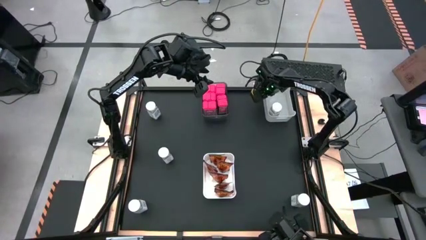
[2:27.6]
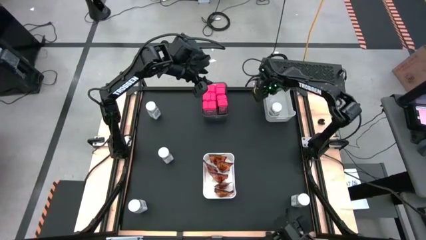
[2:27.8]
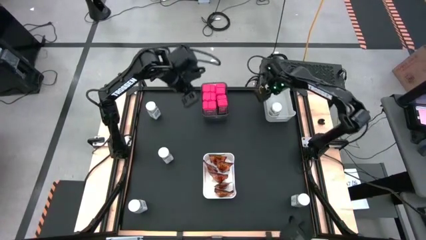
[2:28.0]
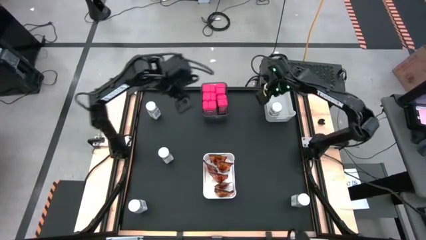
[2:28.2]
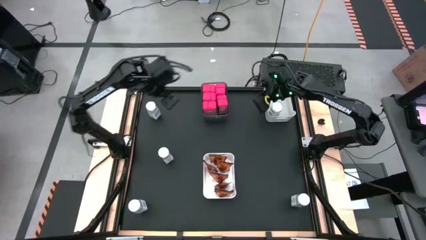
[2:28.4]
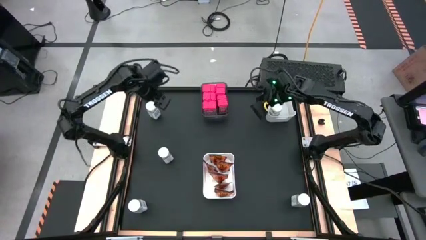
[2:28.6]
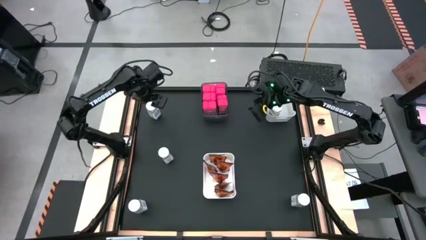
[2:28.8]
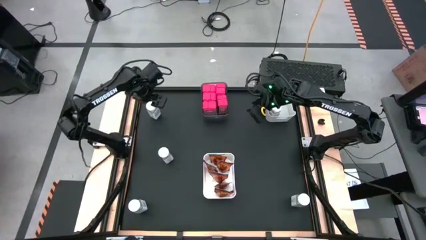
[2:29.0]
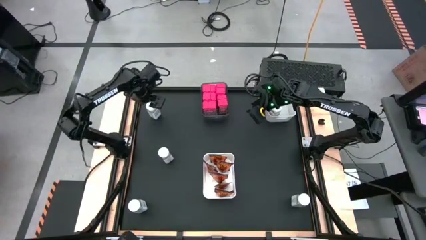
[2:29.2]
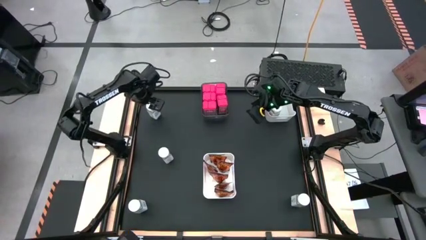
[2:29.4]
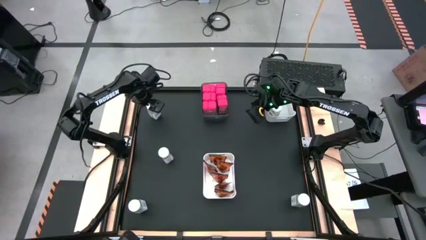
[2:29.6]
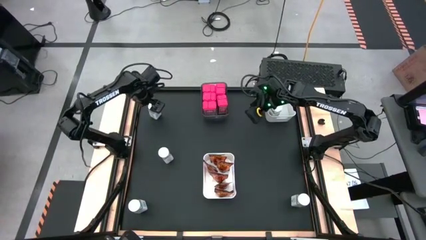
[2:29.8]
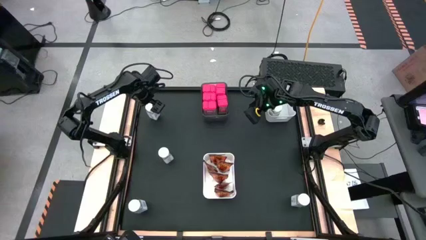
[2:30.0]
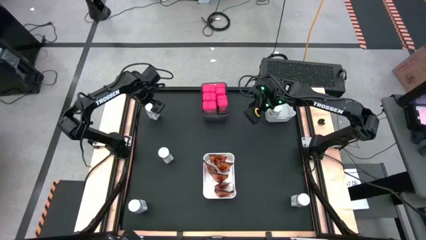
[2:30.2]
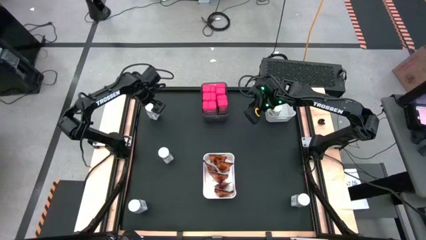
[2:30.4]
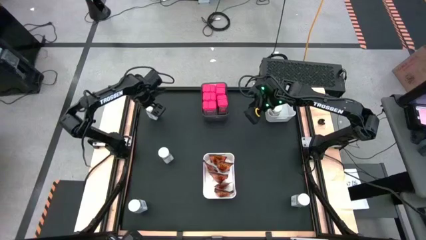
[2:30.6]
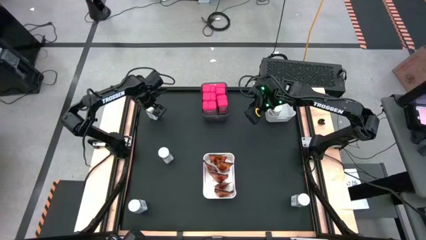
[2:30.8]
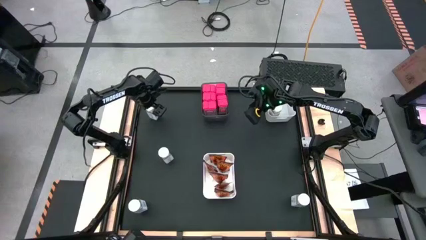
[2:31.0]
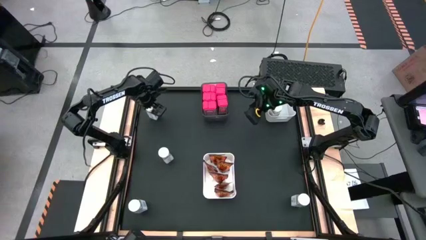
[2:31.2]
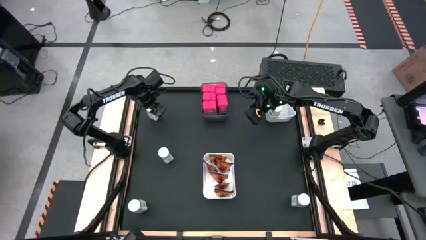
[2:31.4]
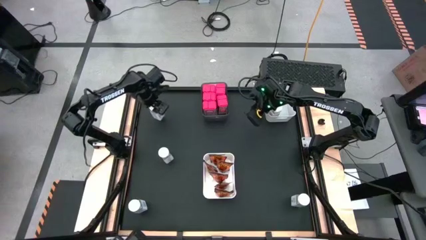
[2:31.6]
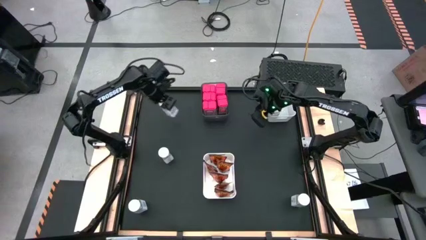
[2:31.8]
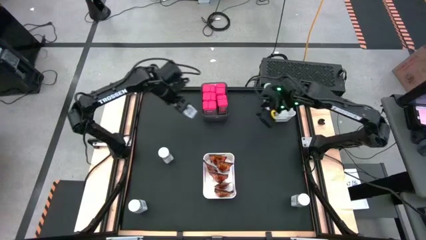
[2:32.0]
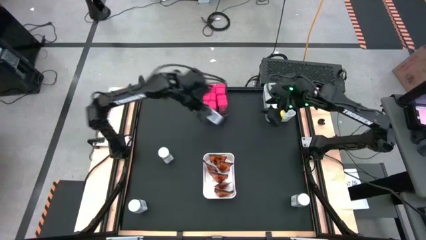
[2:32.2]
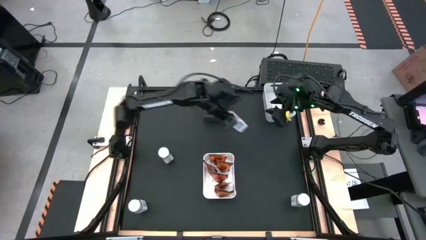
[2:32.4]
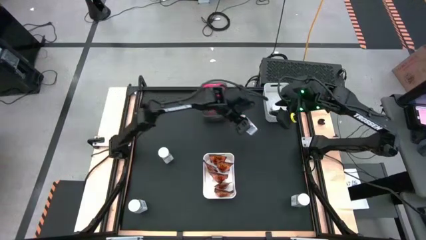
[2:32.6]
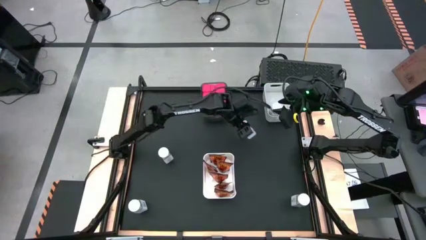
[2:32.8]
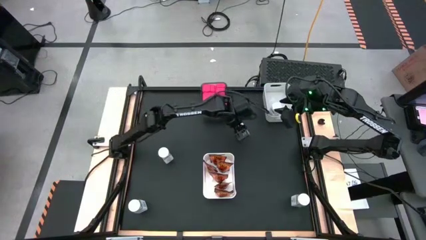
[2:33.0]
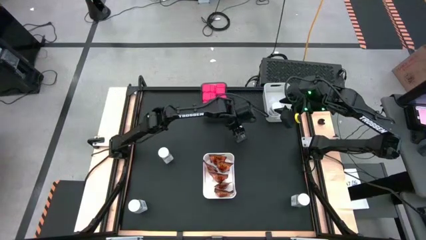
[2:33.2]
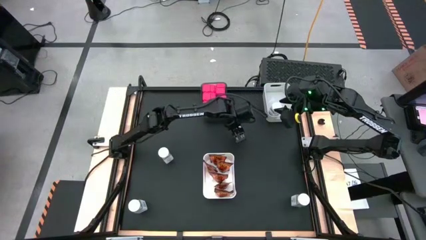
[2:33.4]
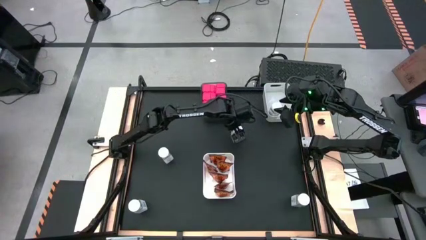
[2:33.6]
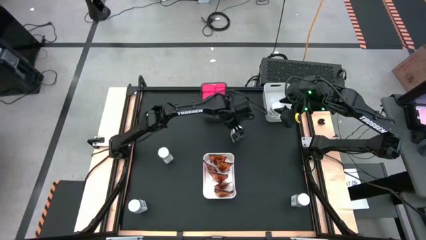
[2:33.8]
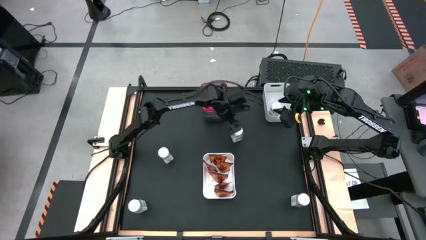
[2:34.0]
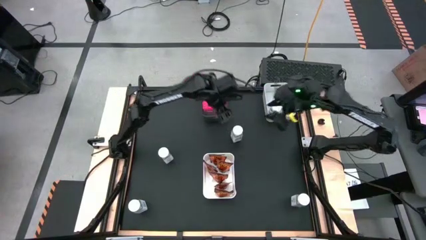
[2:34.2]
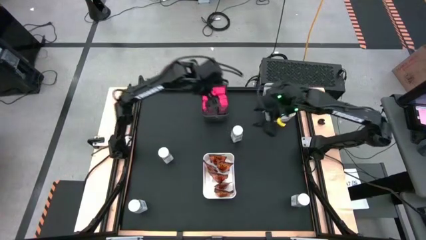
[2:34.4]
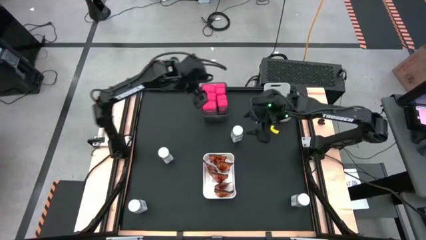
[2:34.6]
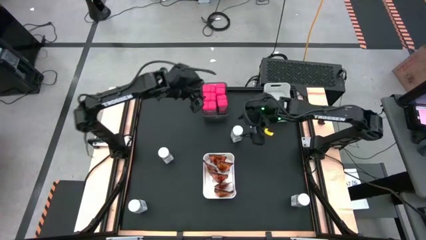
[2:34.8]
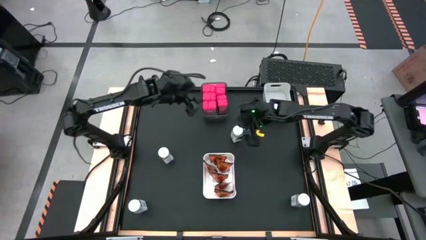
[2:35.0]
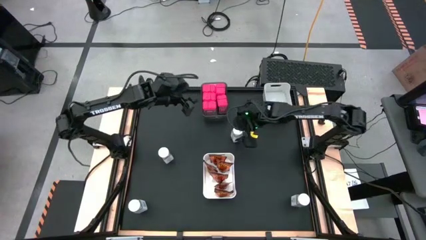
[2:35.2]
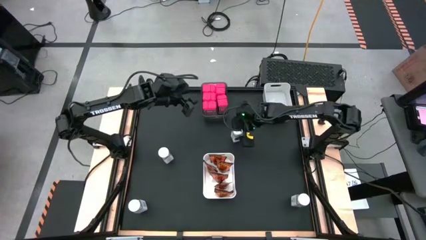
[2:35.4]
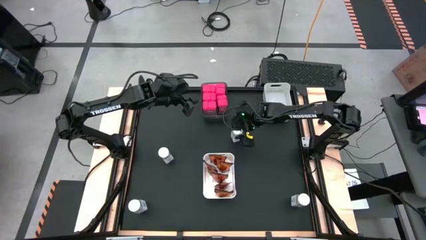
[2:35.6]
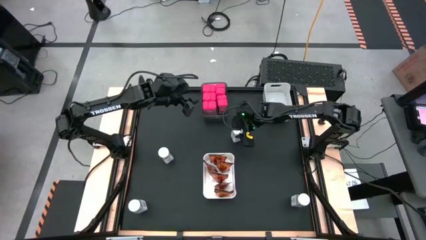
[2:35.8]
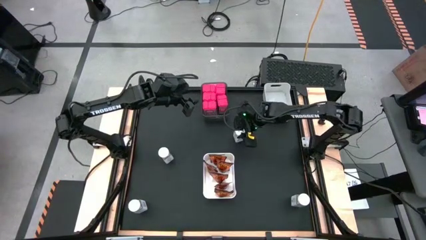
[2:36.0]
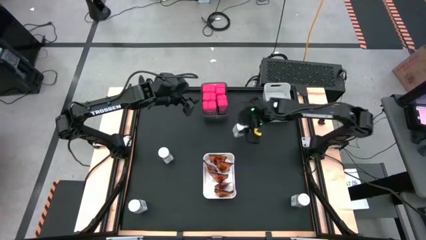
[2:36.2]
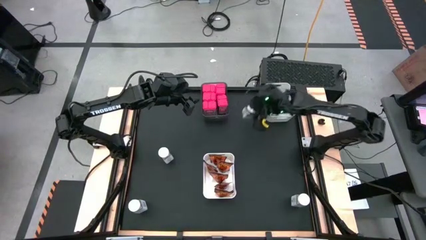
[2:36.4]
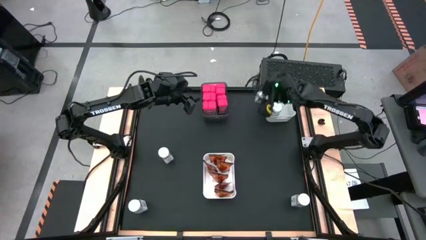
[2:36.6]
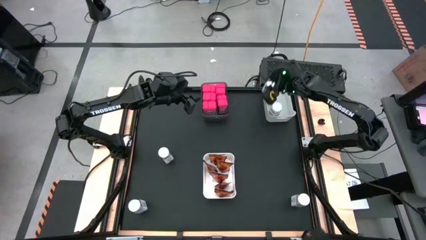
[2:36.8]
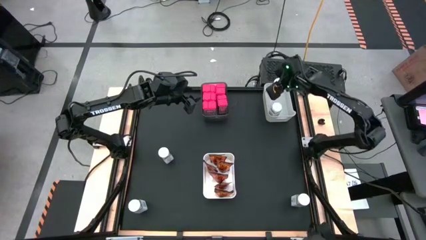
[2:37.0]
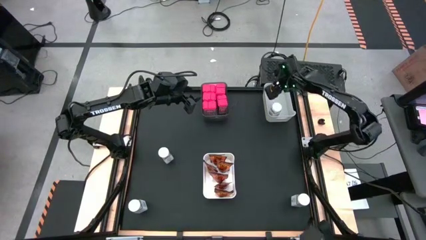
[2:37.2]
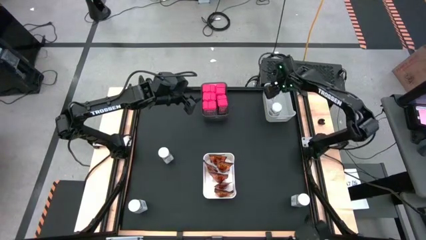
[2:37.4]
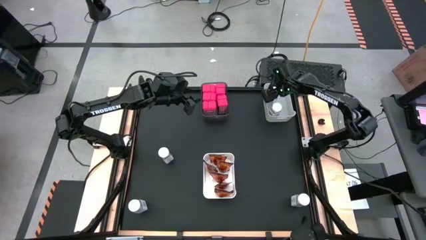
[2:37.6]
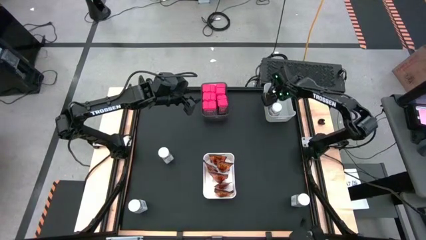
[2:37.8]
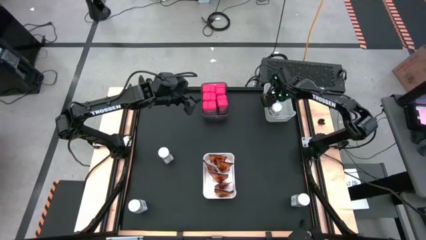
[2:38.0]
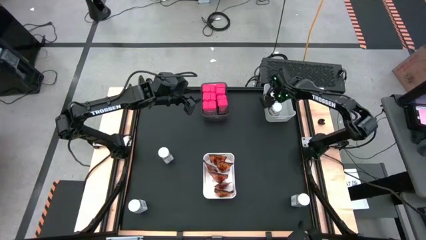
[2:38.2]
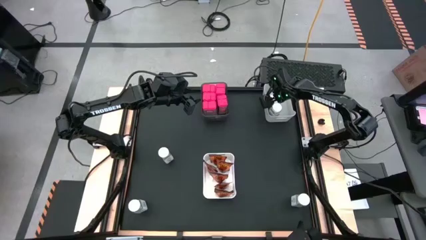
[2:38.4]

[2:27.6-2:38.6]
Task: Sort spices by type
Put the white seasoning bottle into the gray bin

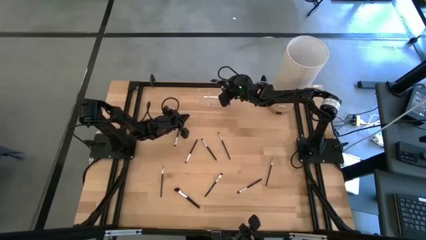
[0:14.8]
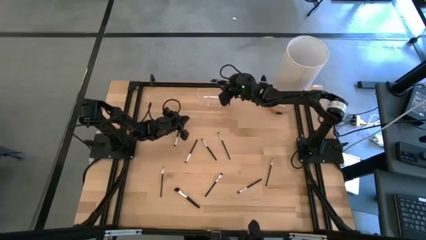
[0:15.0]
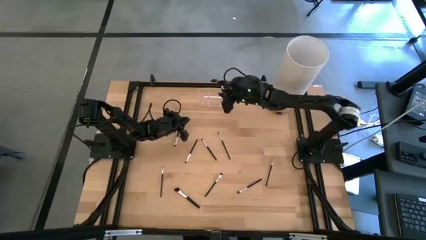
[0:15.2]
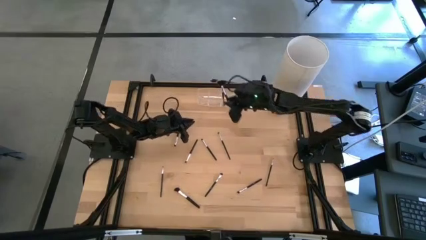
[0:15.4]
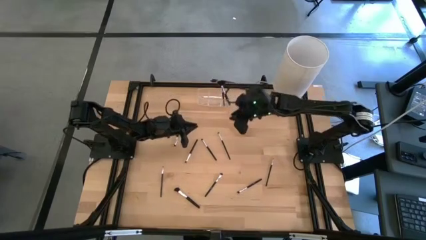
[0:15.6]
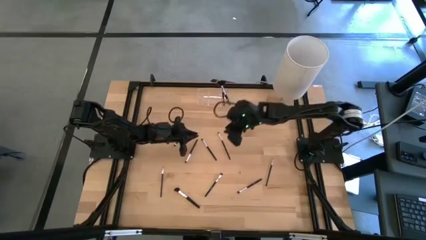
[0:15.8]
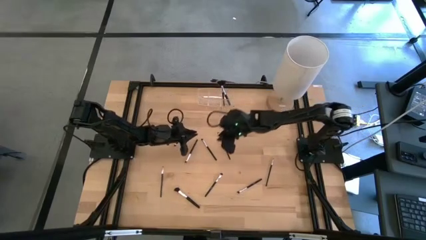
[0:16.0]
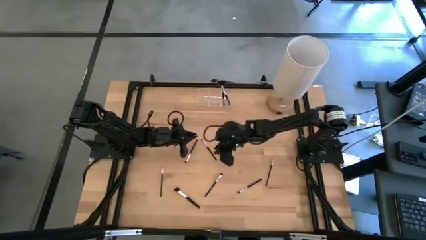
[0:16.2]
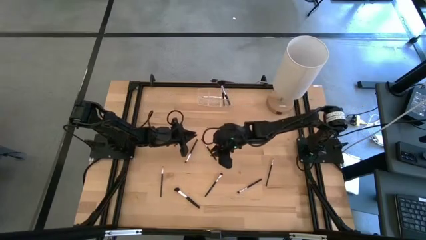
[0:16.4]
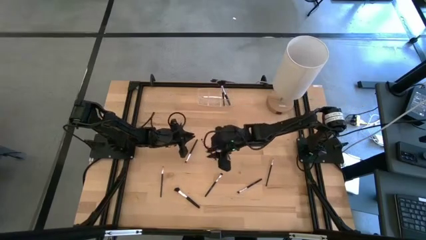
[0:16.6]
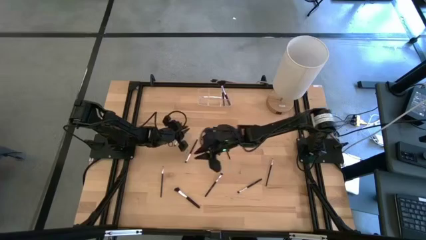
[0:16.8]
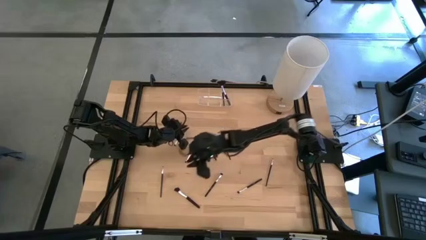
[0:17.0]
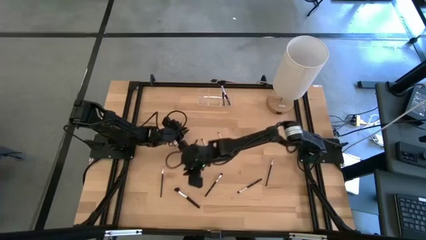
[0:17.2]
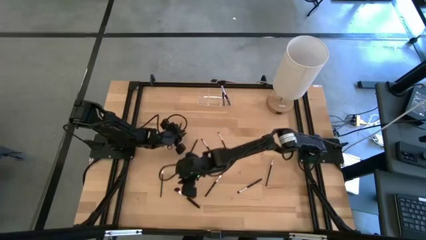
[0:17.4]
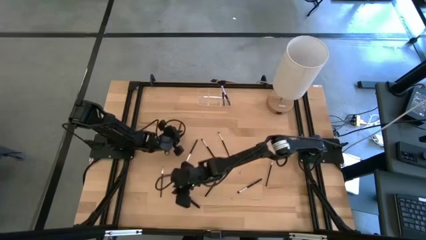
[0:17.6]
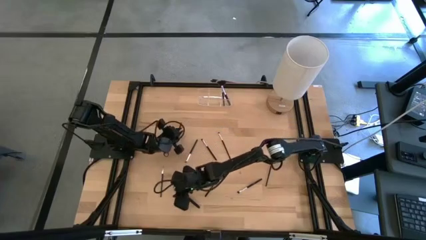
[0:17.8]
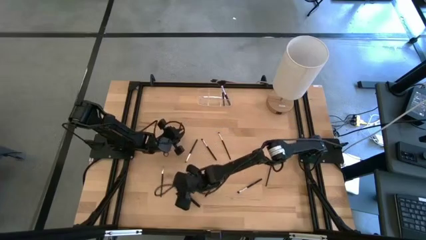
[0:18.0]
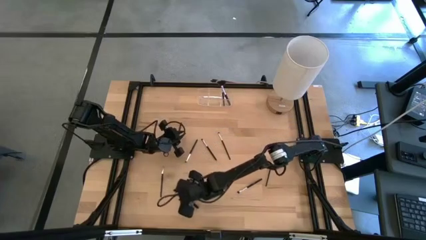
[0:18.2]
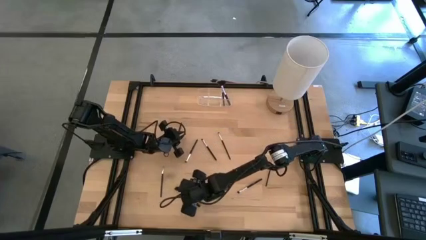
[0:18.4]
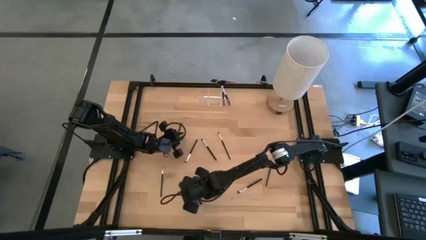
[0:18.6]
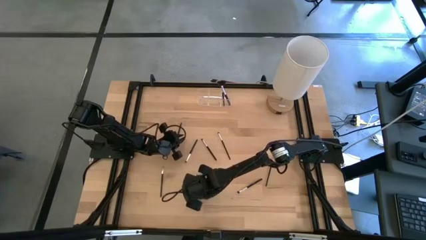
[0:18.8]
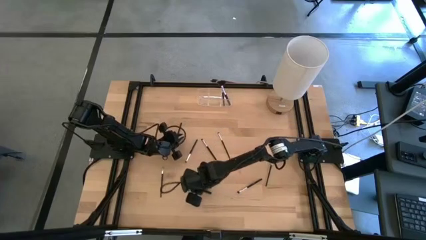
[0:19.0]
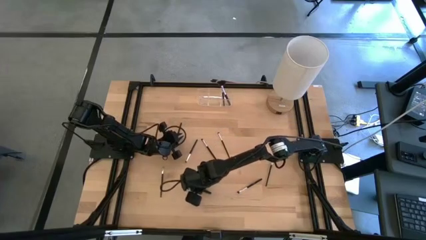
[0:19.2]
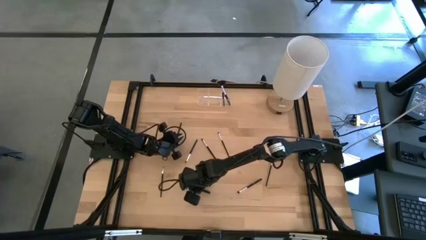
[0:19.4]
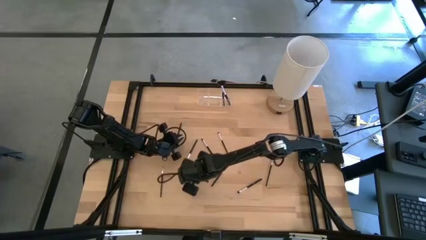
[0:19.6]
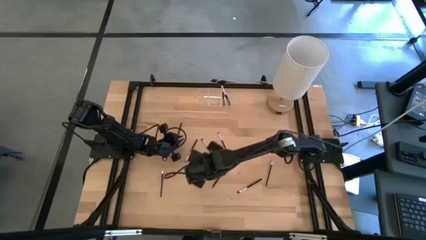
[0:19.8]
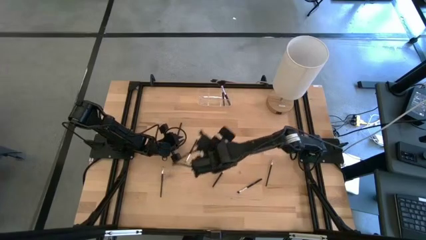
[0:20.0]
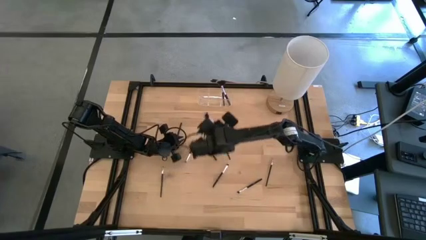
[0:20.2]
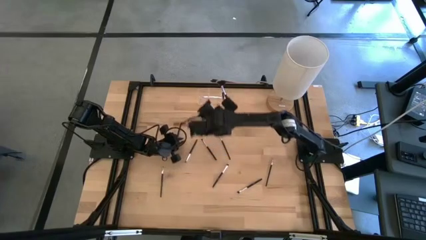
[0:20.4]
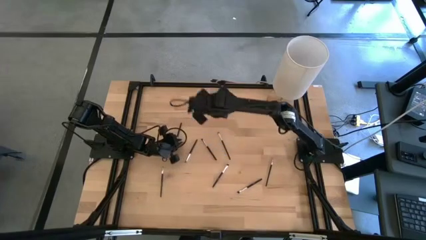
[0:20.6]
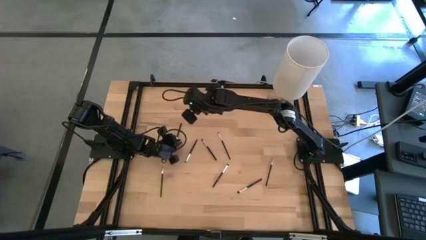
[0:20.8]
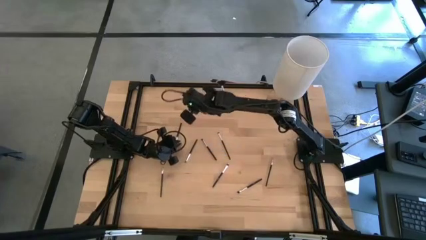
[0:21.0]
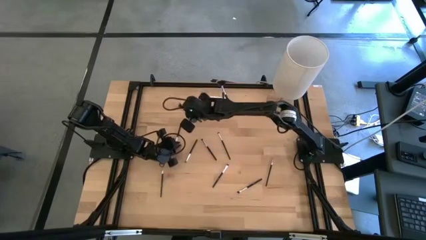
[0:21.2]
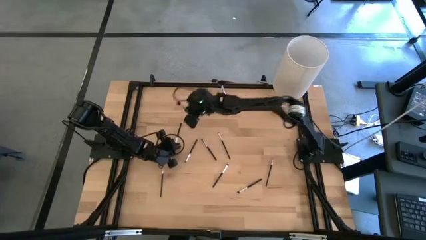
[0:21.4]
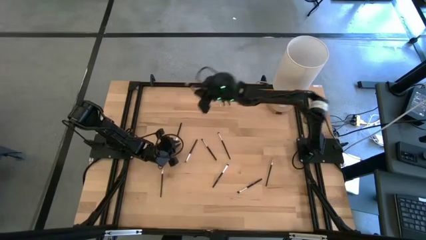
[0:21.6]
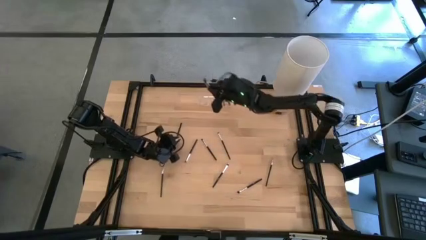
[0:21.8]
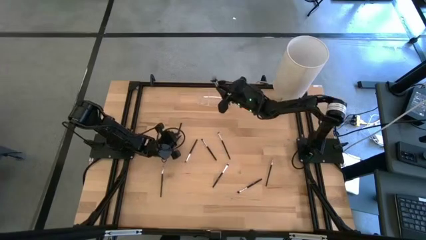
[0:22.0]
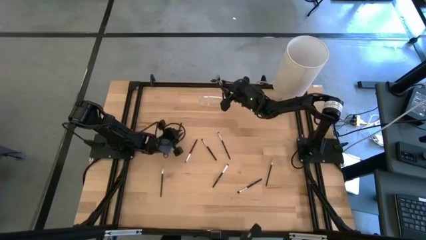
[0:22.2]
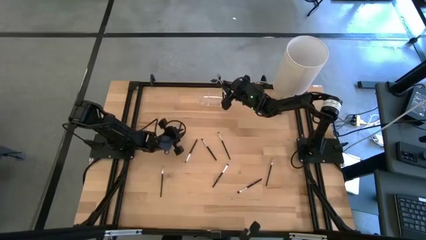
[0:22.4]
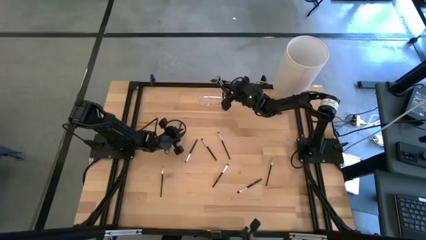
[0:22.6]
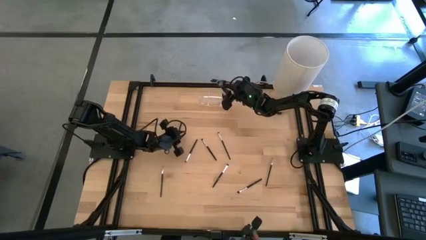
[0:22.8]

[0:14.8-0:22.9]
Task: Put items in baskets/containers
Put the black powder brush into the transparent organizer
